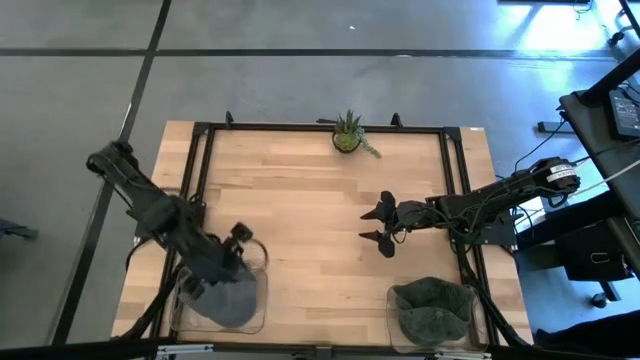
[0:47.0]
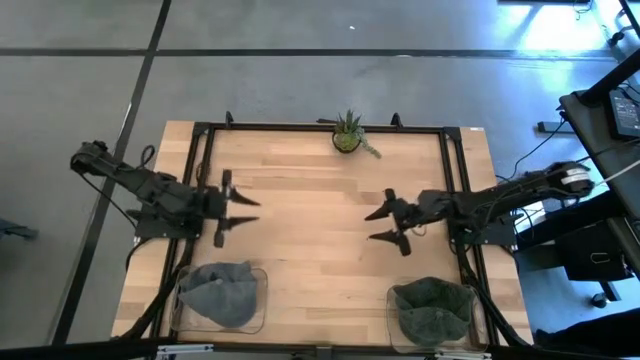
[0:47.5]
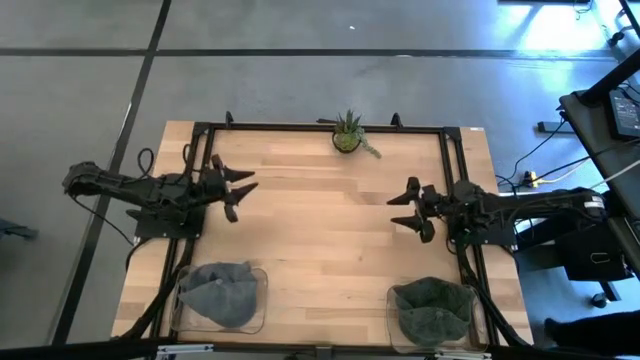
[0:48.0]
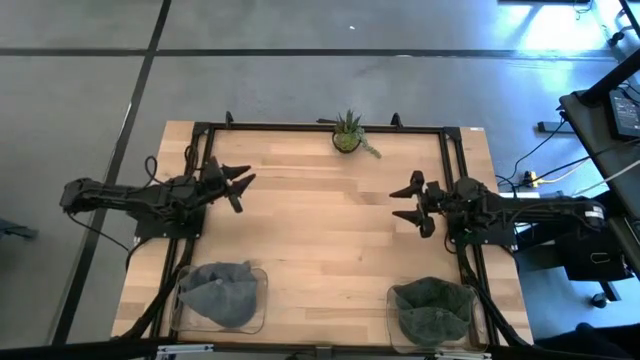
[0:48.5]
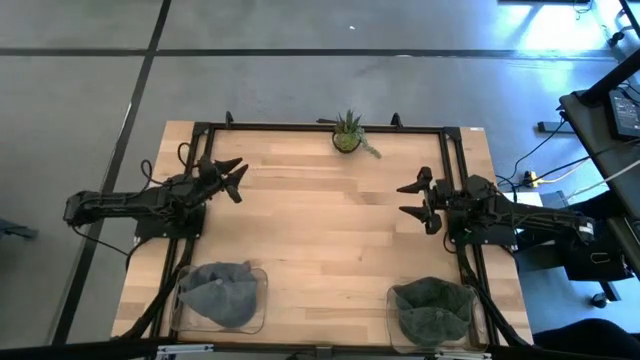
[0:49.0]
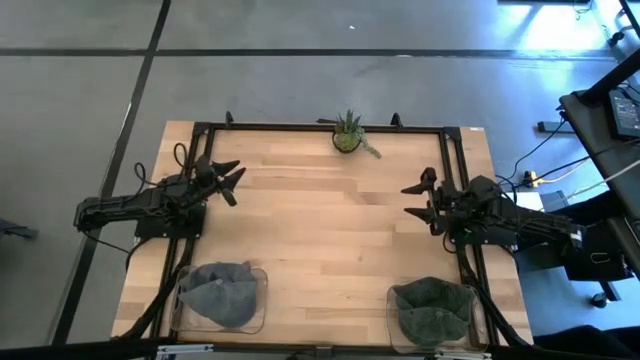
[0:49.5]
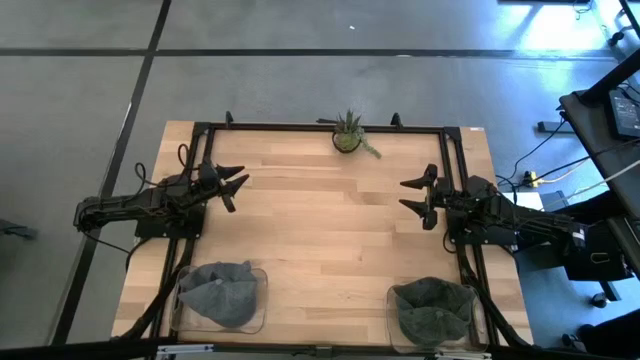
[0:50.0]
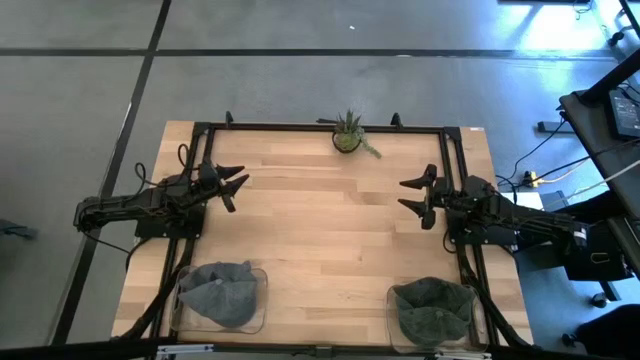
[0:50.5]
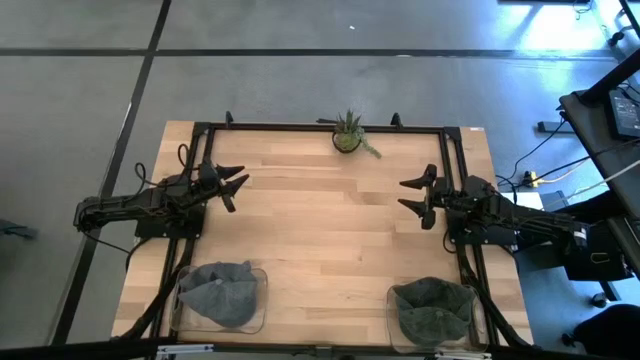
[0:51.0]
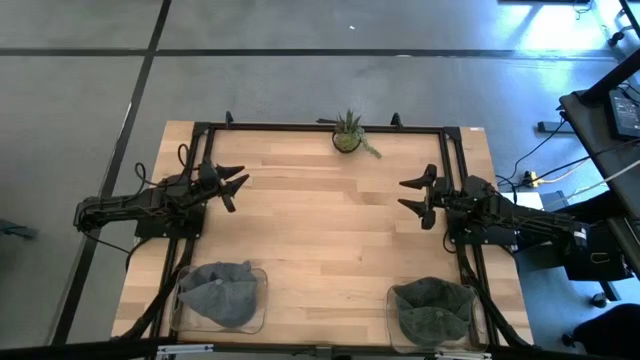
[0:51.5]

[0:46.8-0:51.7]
Task: Pick & Place hat
Return to Home Position

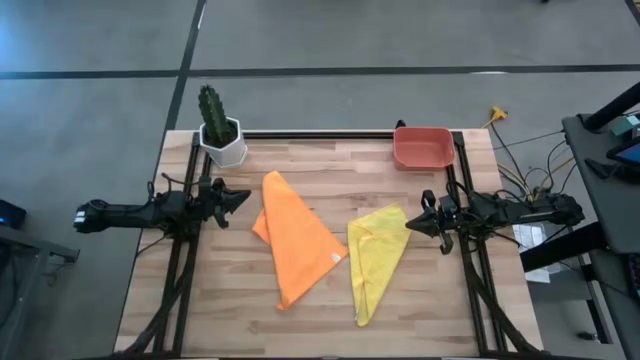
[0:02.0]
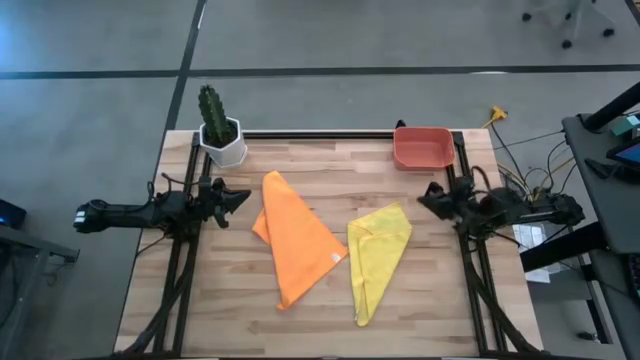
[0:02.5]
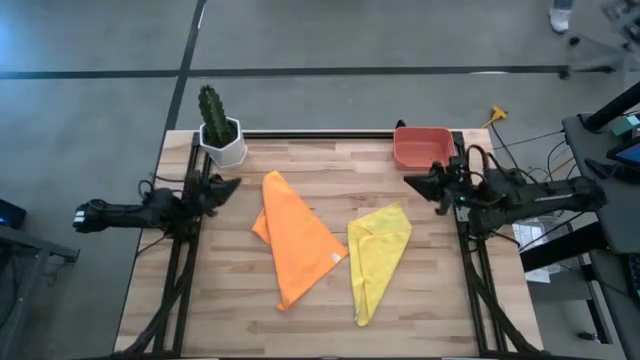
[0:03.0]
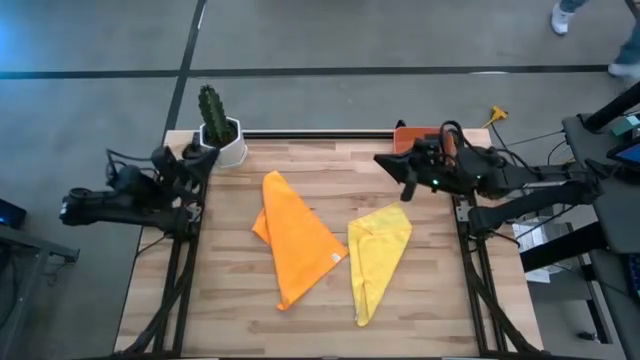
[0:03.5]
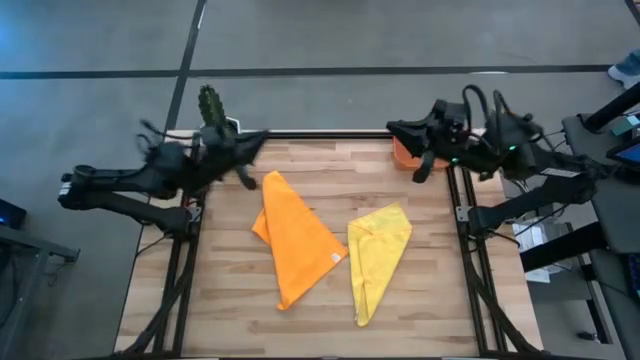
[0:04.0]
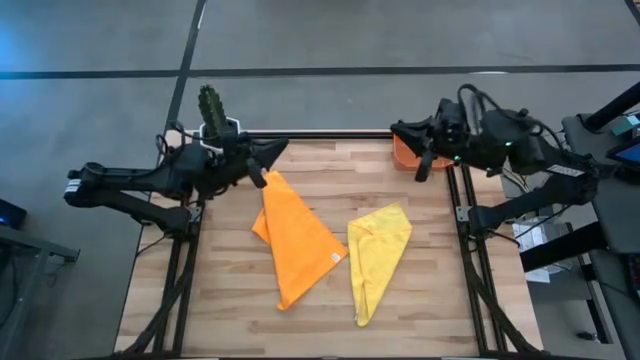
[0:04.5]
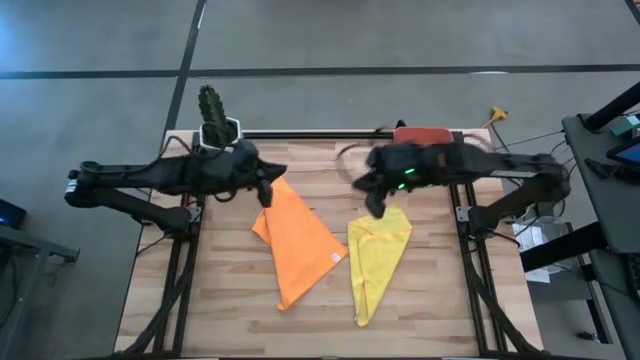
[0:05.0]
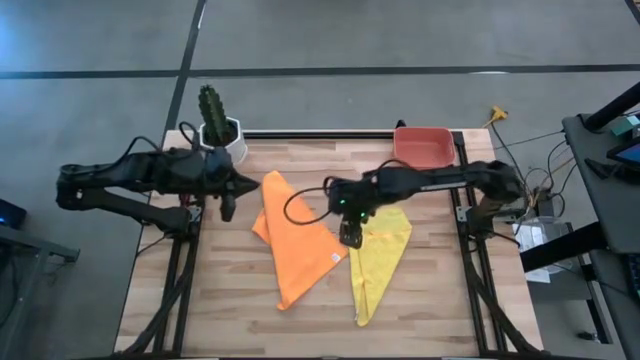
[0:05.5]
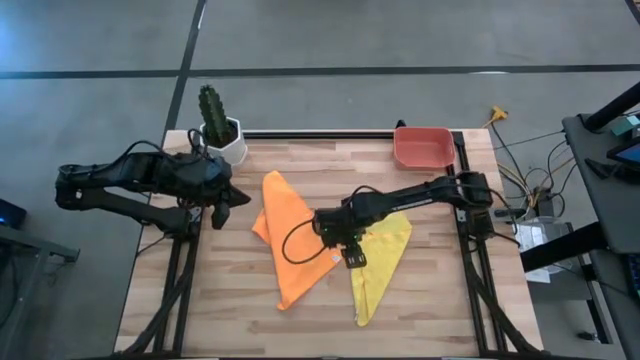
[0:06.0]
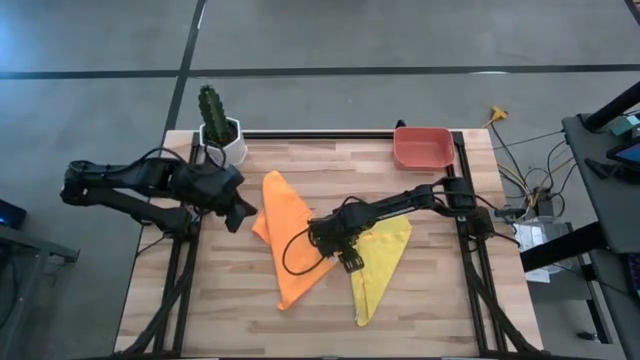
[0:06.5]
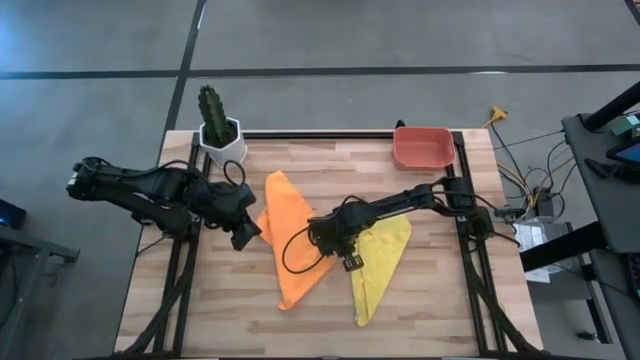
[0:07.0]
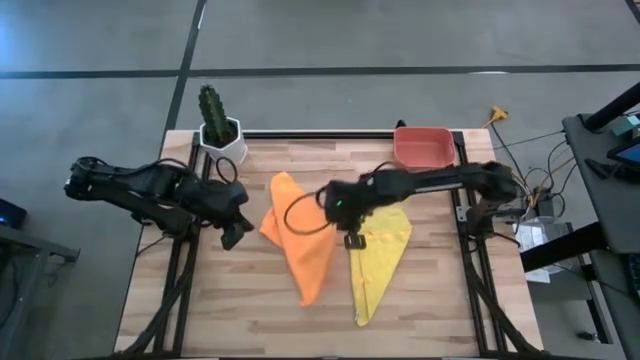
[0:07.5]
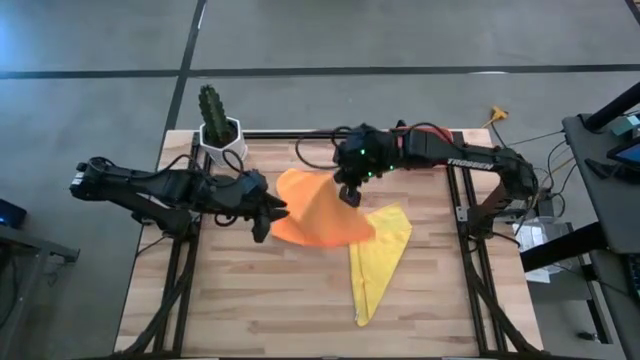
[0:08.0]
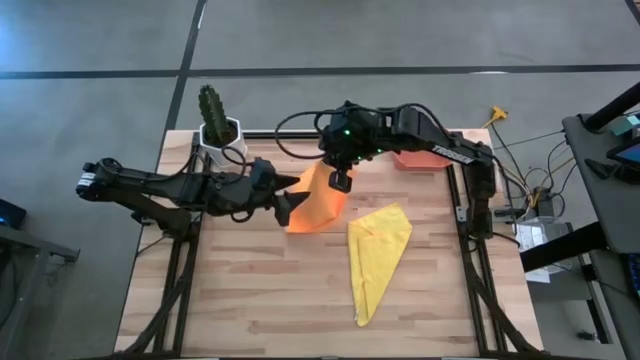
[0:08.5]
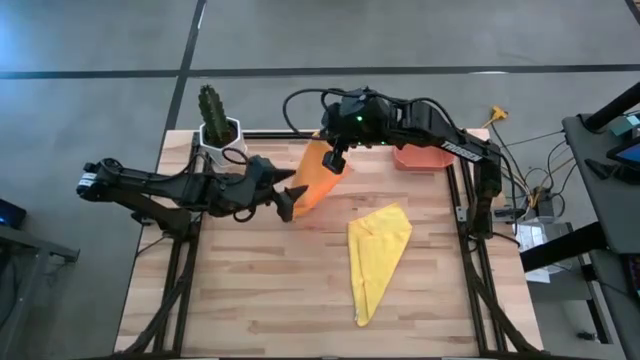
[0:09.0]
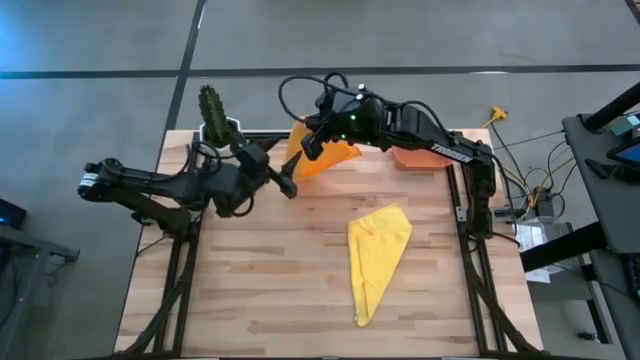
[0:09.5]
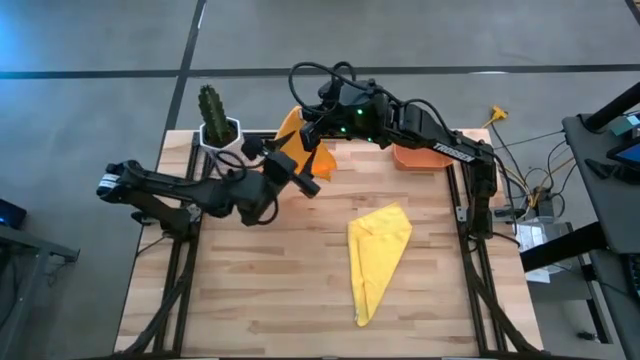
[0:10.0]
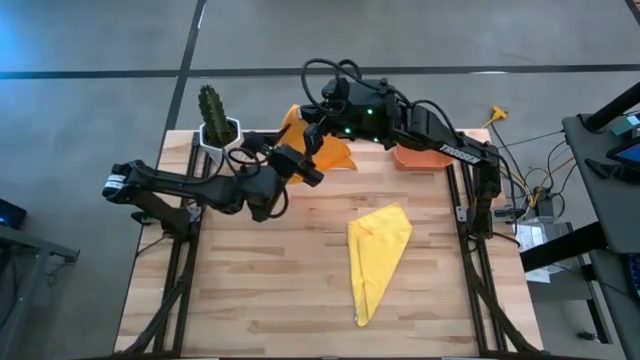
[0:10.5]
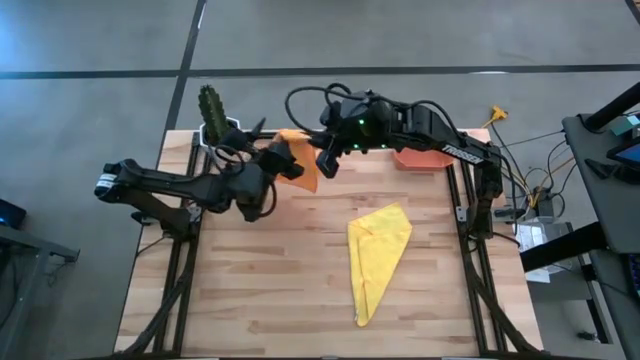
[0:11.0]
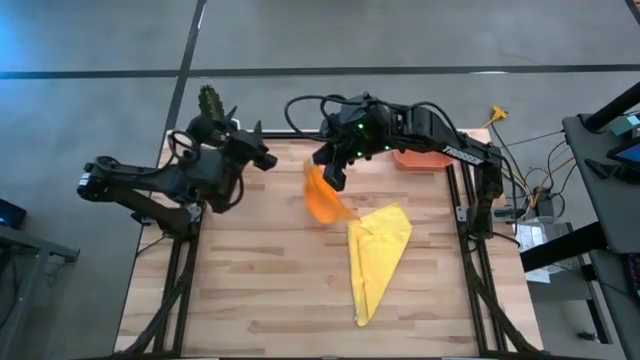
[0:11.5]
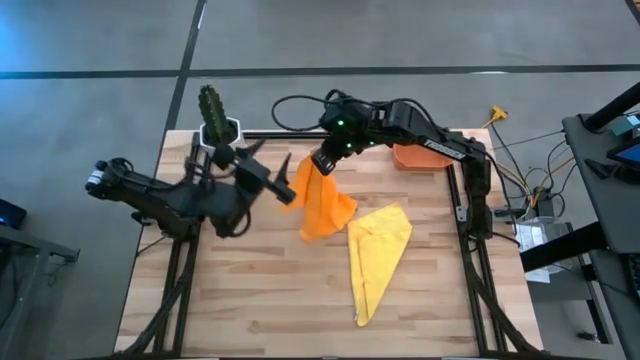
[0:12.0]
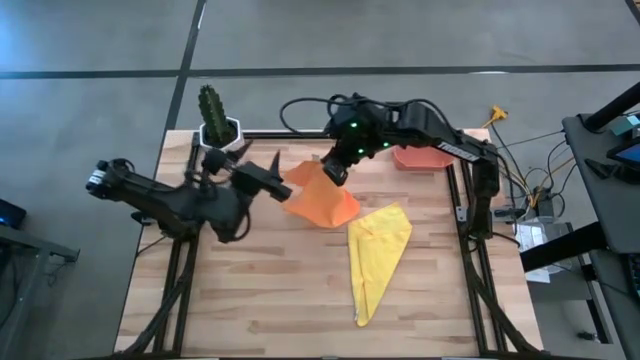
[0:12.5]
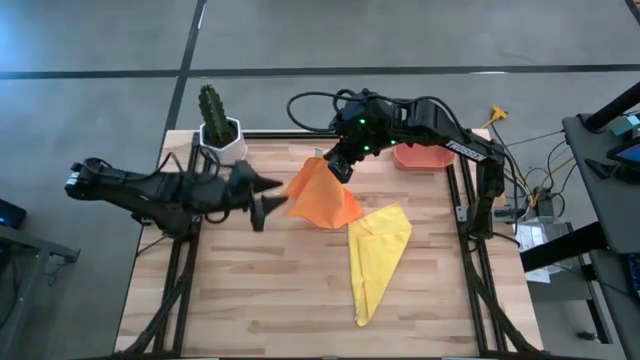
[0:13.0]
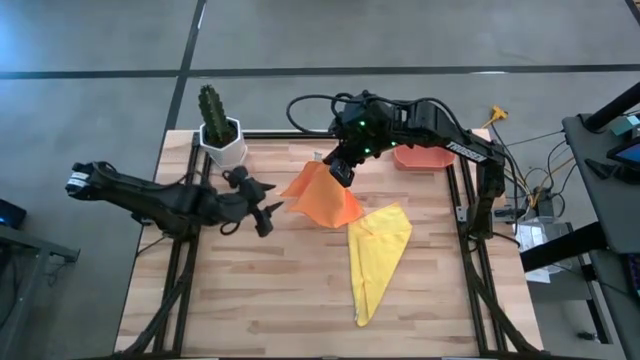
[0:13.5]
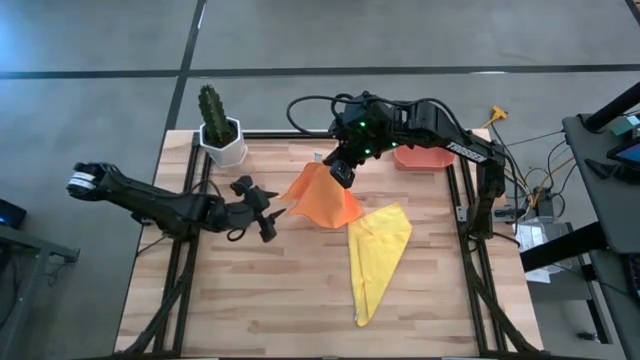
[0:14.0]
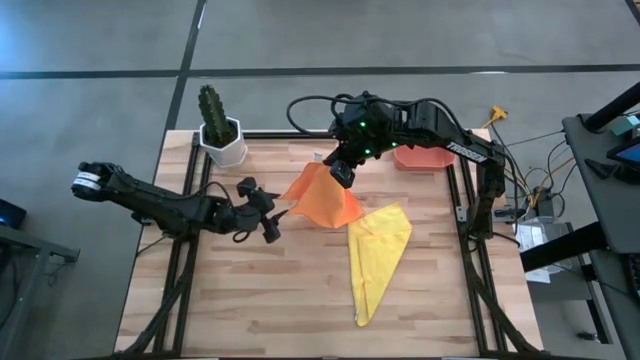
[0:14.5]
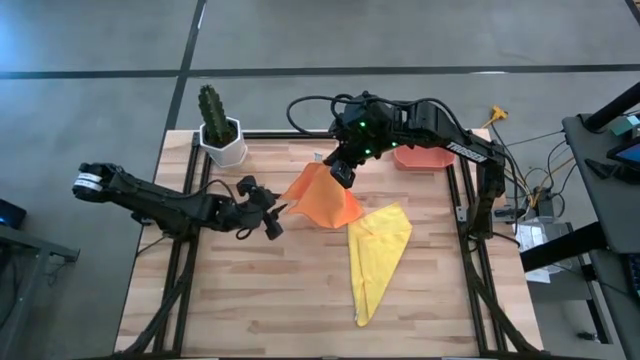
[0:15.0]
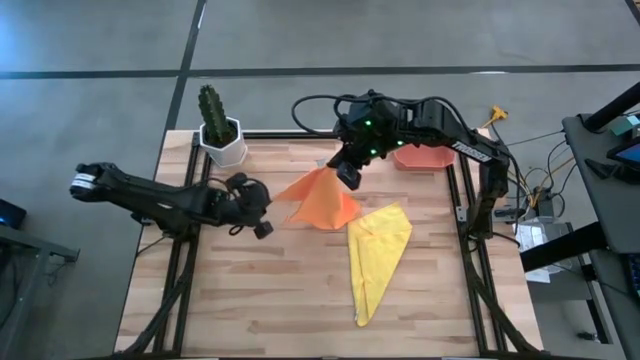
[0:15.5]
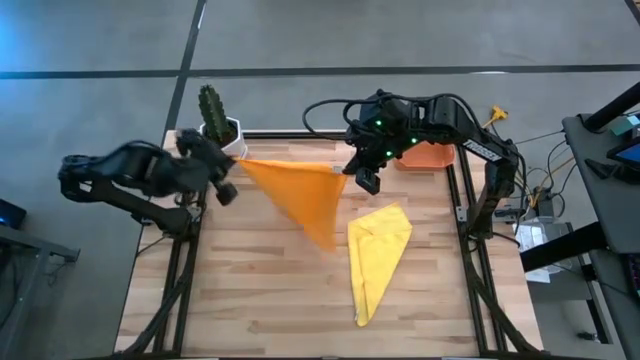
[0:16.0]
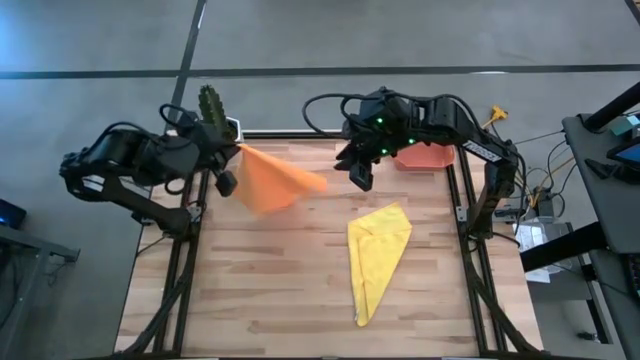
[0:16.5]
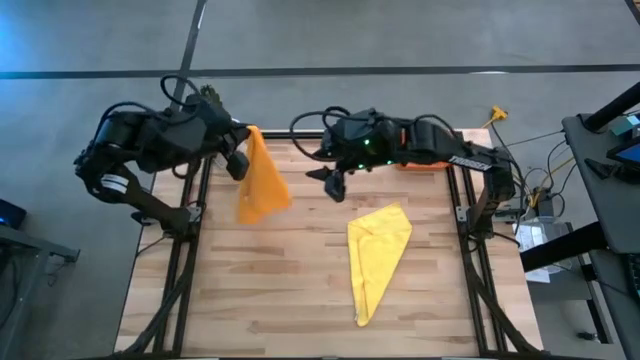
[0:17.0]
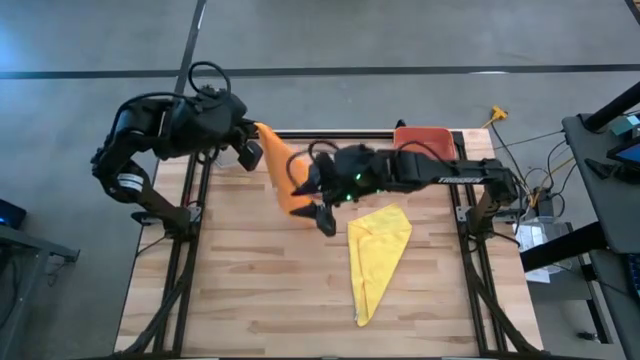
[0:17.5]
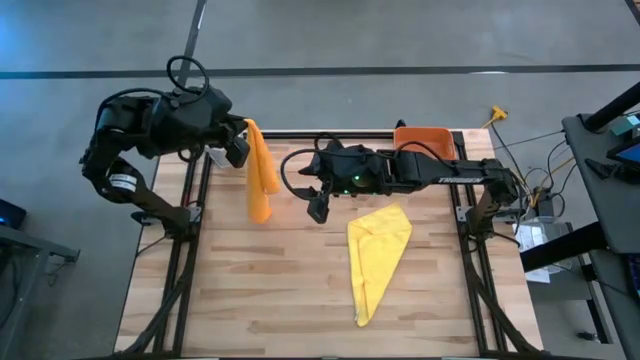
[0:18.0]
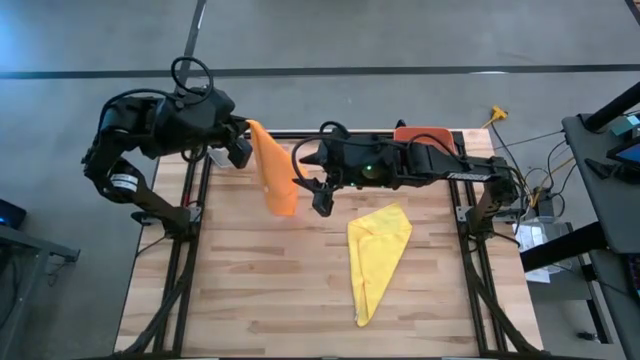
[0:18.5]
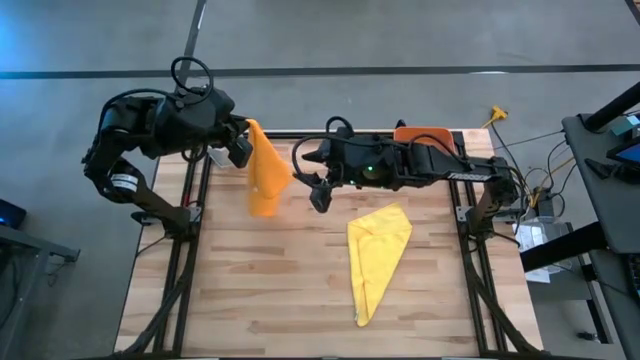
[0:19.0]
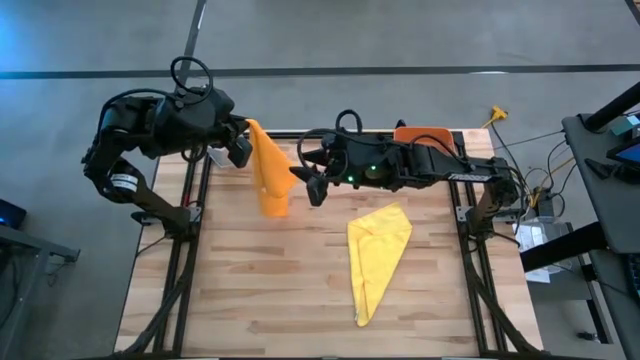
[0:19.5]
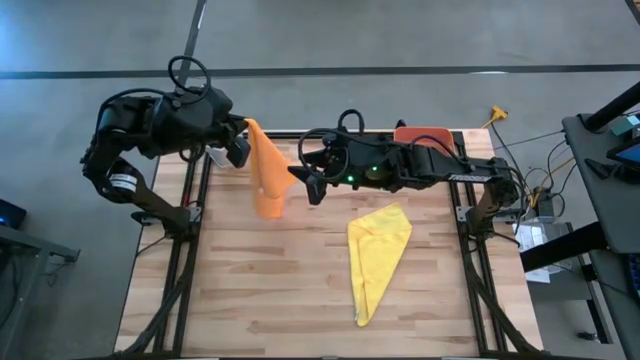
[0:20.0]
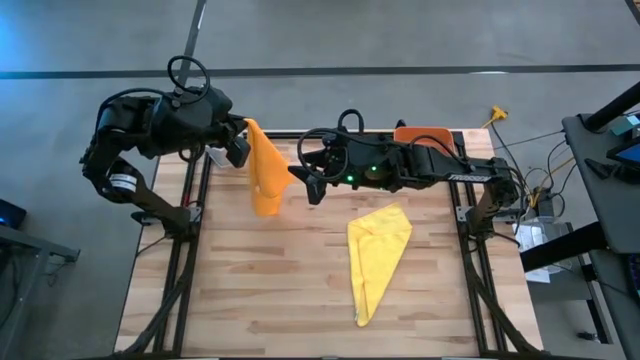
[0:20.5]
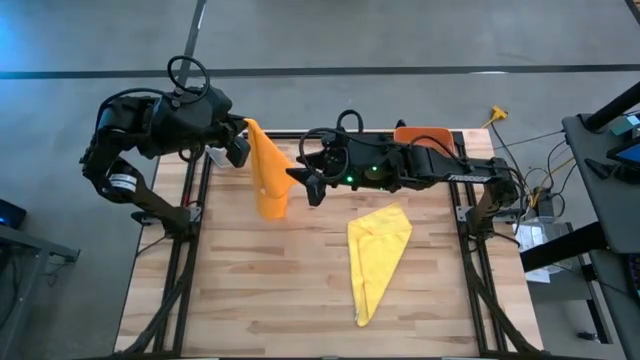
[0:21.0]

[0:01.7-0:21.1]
Task: Roll microfiber towels into tight, uniform cylinder then place into a basket
Fold the orange towel
